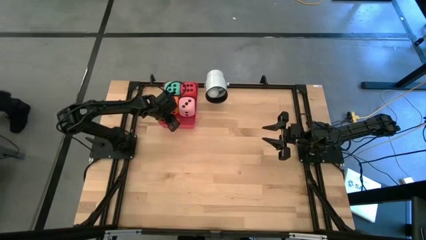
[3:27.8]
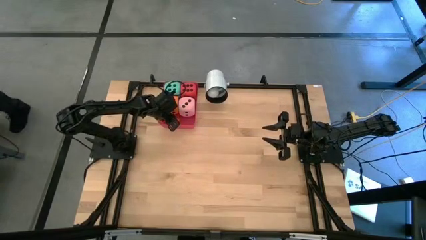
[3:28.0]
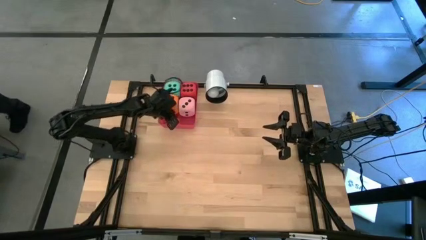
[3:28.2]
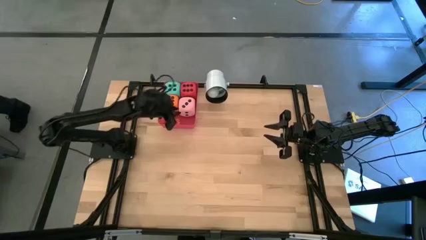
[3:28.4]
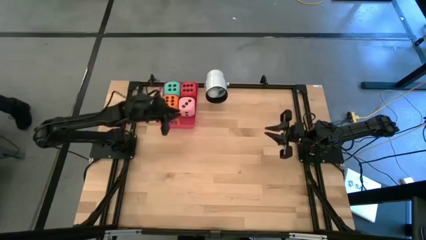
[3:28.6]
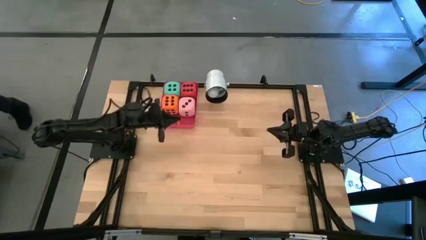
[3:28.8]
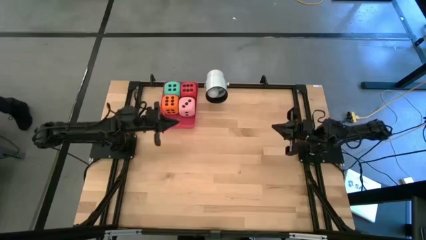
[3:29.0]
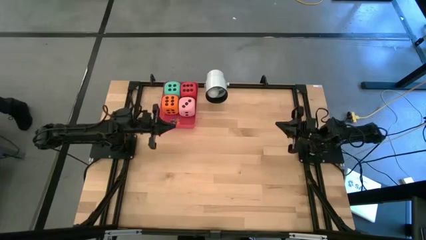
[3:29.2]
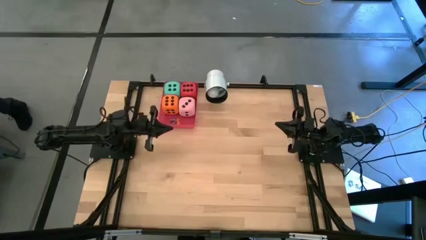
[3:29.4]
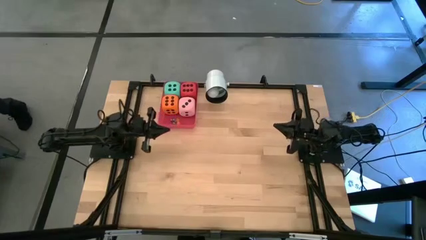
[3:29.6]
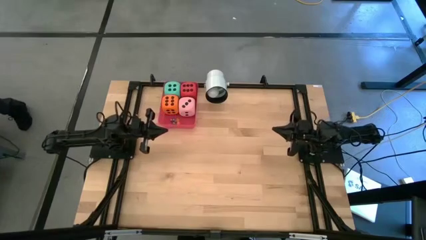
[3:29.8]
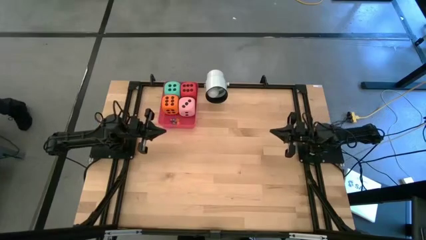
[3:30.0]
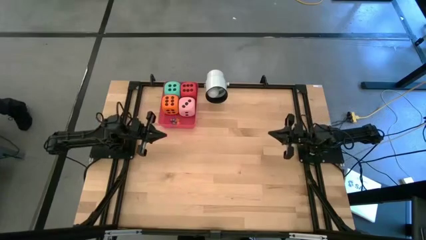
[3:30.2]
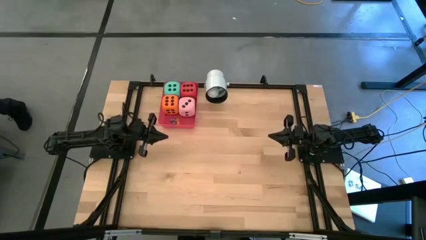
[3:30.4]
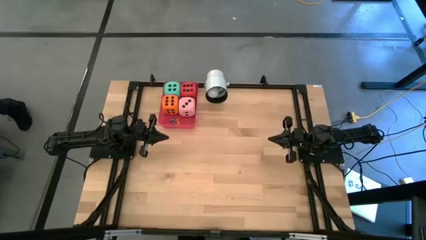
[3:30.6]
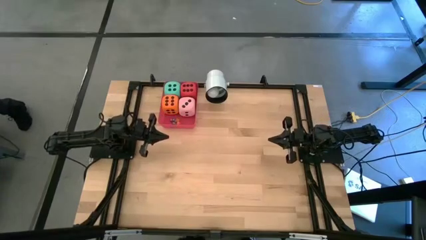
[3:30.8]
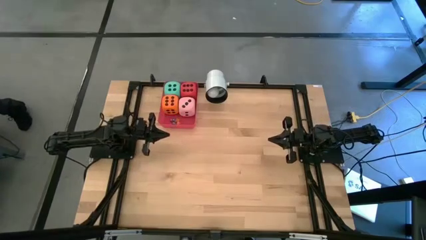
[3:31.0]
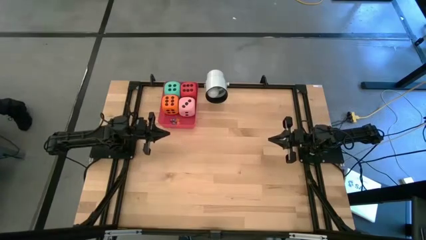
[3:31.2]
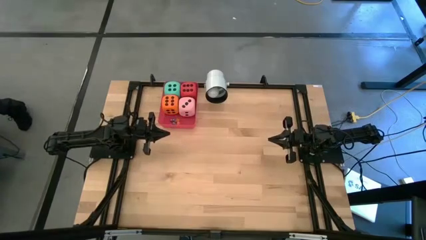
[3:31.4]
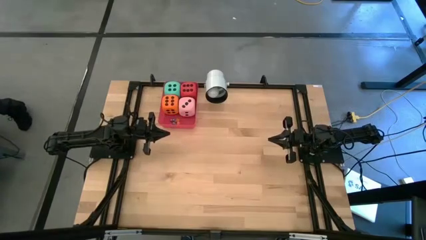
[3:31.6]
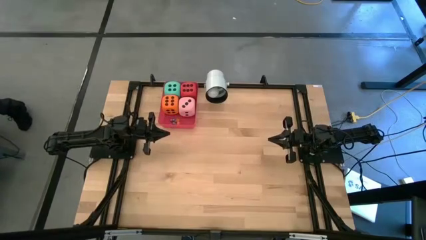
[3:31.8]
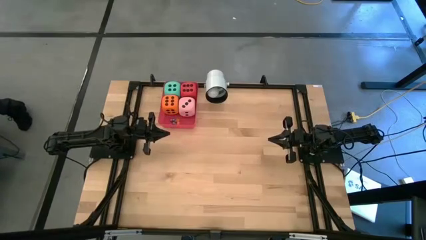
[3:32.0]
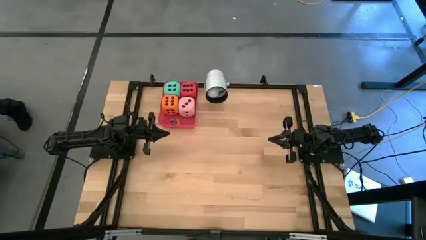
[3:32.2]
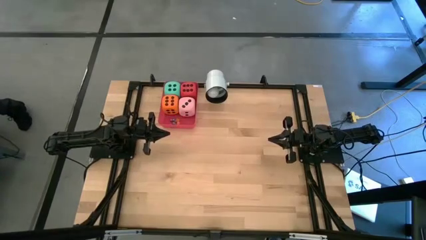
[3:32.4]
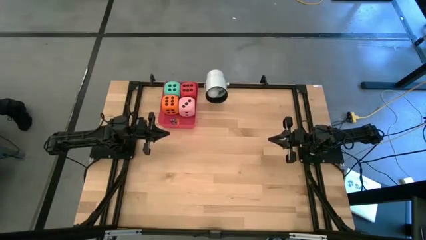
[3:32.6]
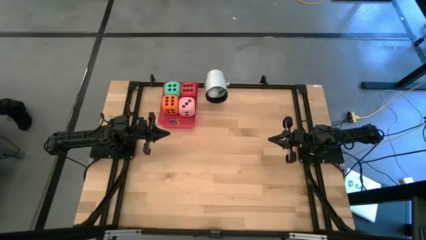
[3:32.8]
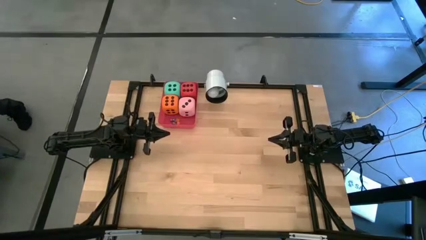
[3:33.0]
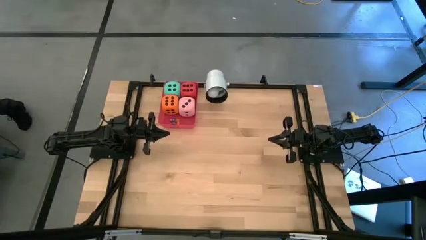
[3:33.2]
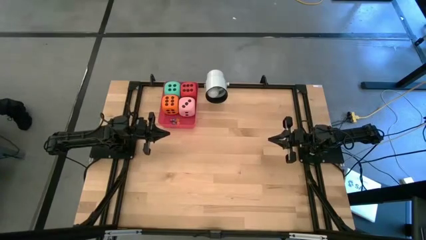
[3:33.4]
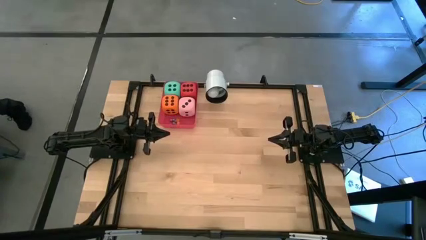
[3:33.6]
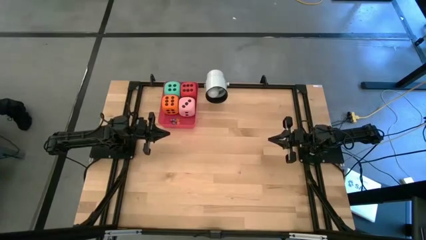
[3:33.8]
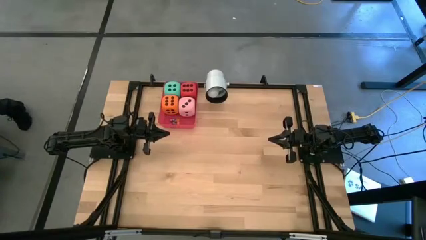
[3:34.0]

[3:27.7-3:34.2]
Task: Pick & Place Dice
Return to Home Position

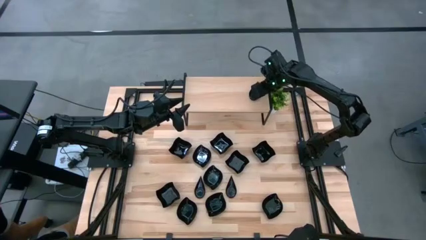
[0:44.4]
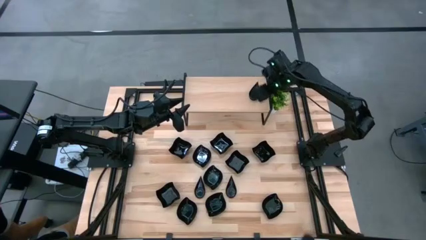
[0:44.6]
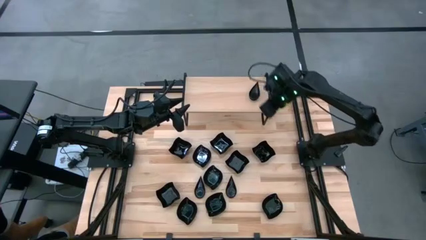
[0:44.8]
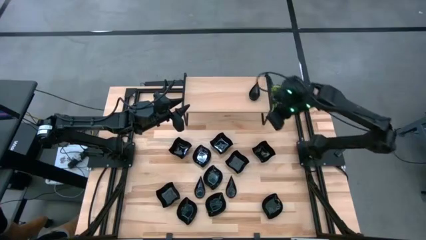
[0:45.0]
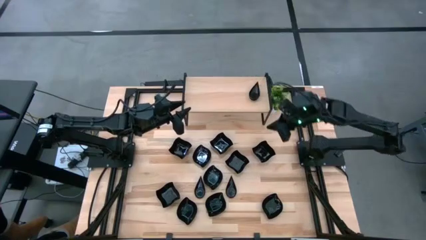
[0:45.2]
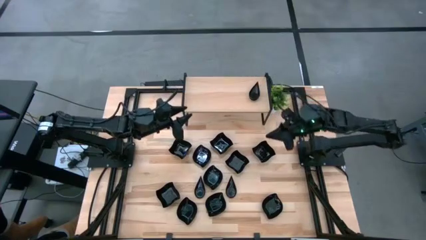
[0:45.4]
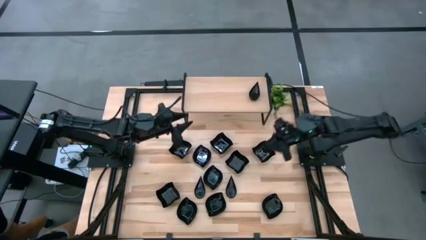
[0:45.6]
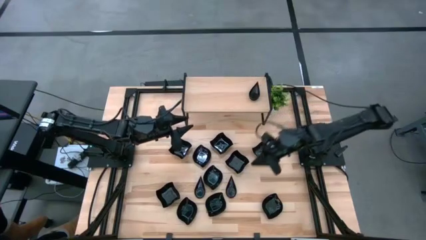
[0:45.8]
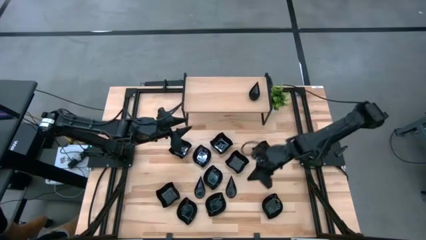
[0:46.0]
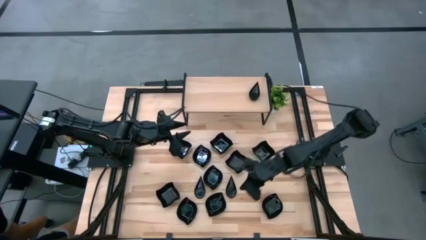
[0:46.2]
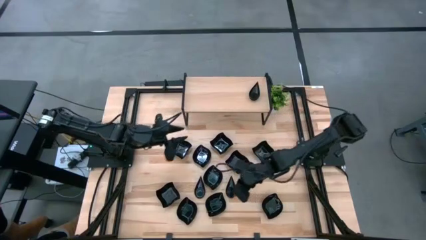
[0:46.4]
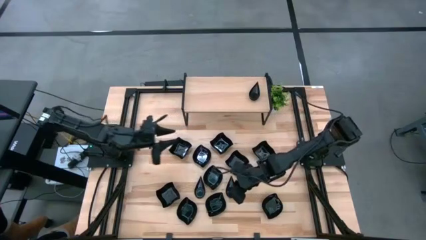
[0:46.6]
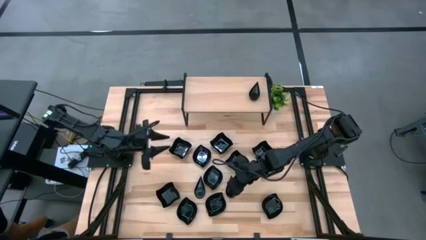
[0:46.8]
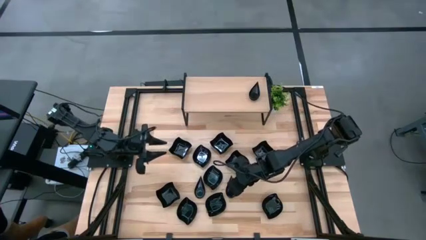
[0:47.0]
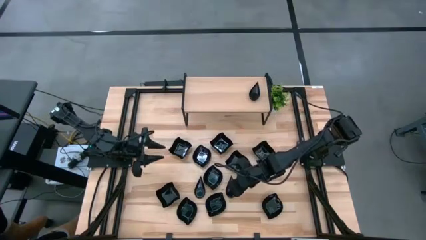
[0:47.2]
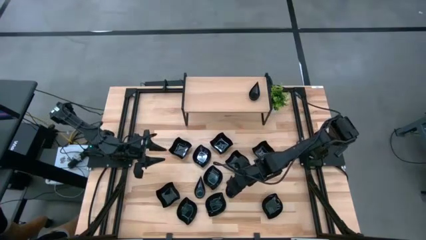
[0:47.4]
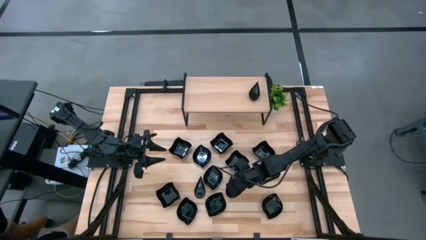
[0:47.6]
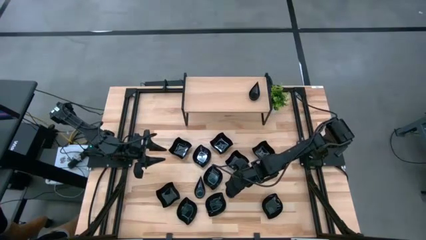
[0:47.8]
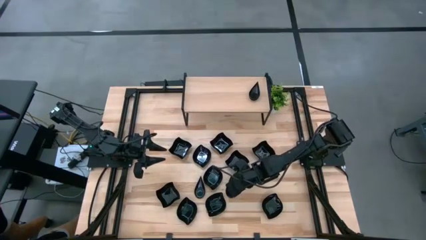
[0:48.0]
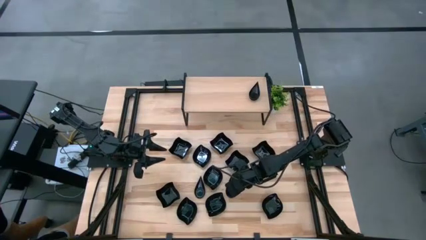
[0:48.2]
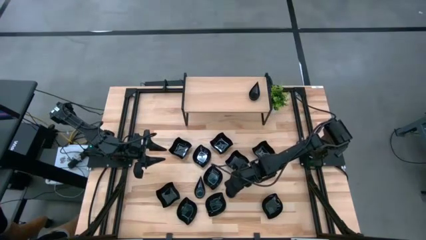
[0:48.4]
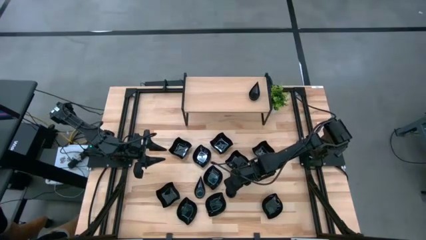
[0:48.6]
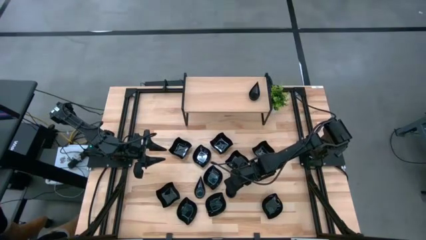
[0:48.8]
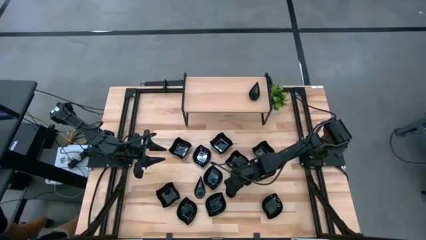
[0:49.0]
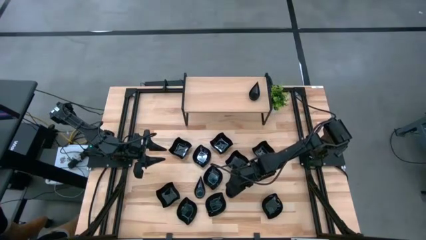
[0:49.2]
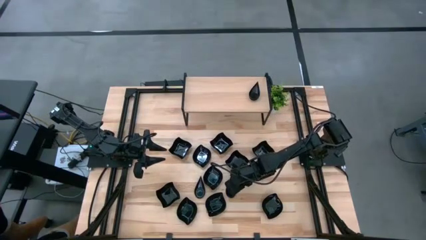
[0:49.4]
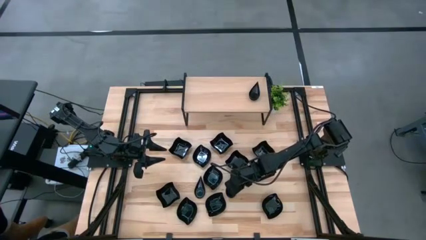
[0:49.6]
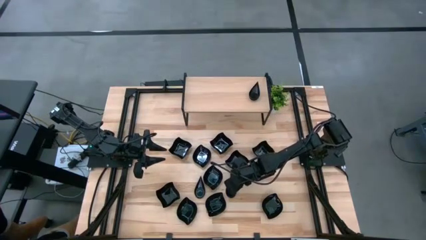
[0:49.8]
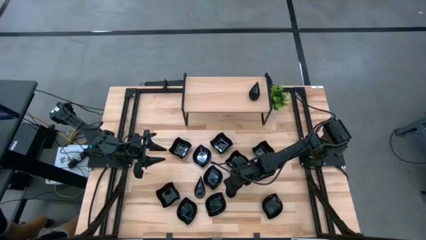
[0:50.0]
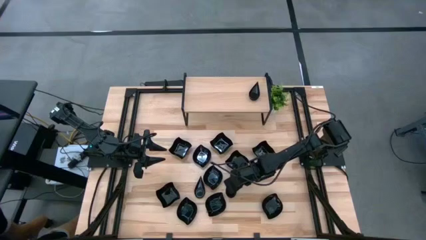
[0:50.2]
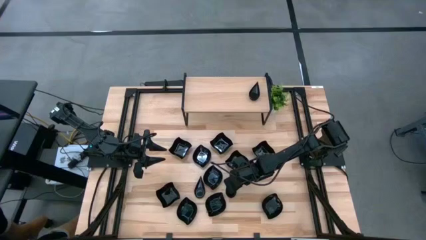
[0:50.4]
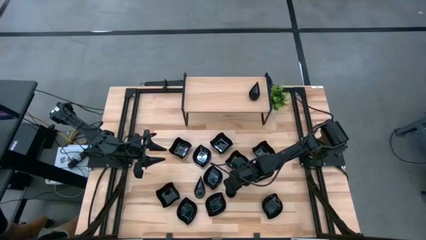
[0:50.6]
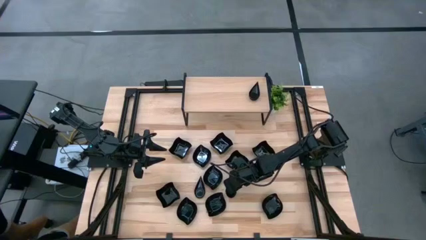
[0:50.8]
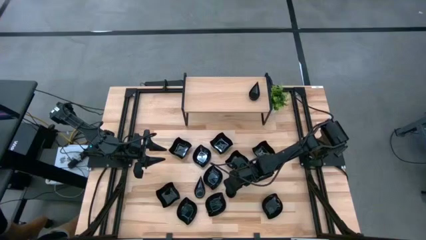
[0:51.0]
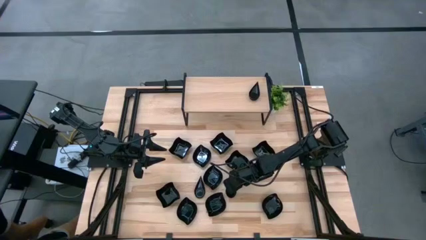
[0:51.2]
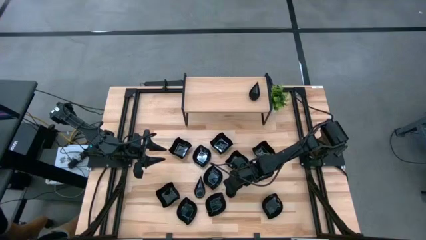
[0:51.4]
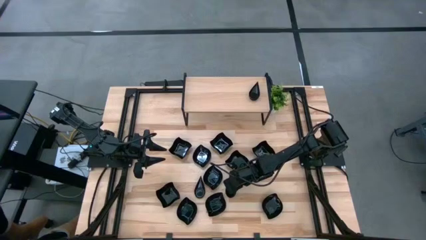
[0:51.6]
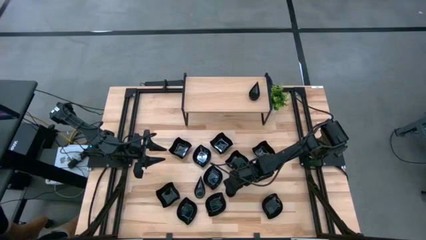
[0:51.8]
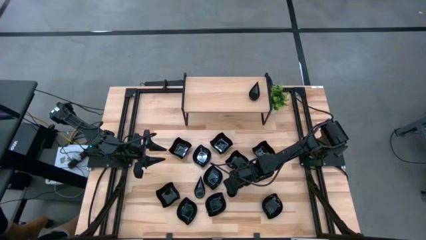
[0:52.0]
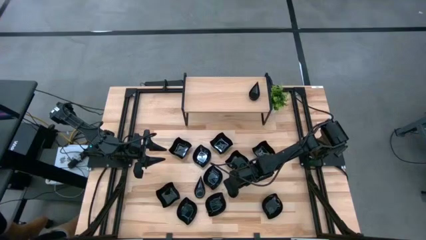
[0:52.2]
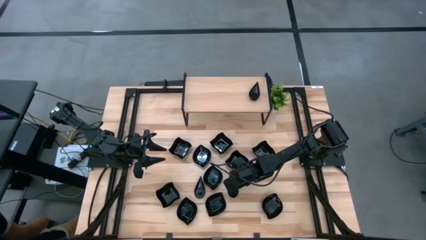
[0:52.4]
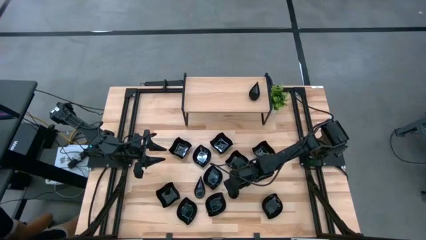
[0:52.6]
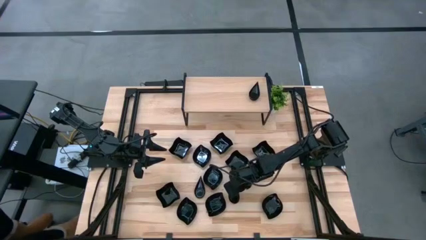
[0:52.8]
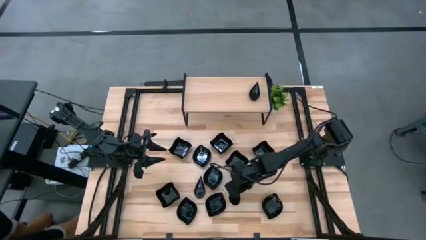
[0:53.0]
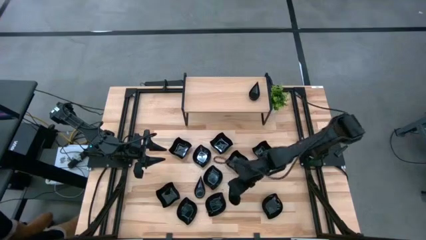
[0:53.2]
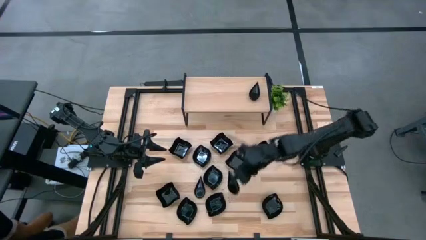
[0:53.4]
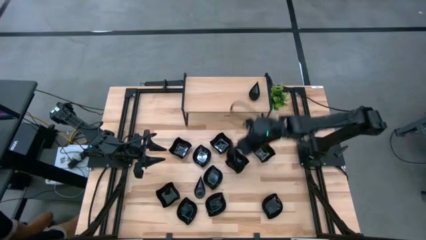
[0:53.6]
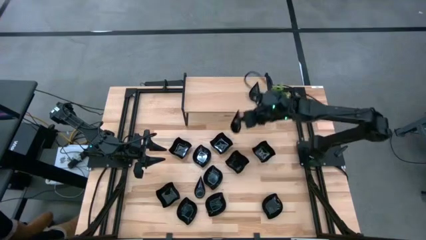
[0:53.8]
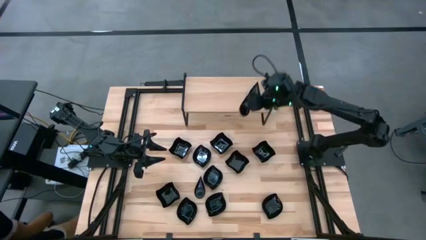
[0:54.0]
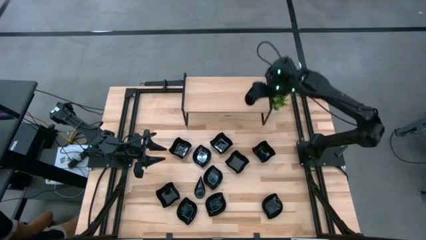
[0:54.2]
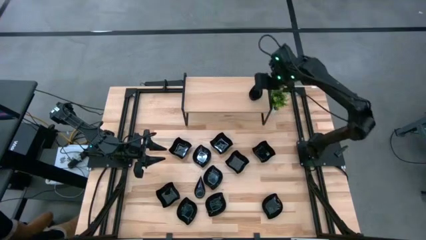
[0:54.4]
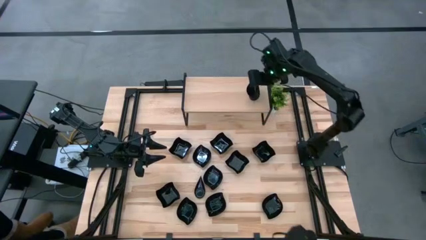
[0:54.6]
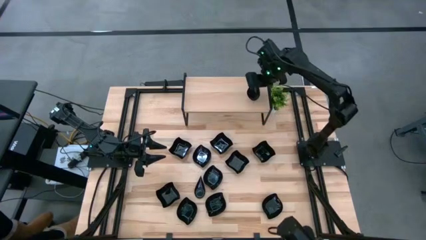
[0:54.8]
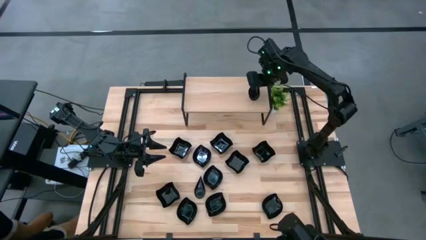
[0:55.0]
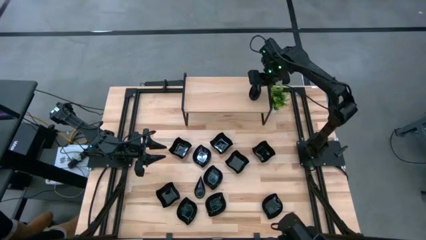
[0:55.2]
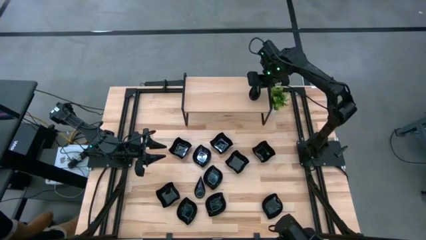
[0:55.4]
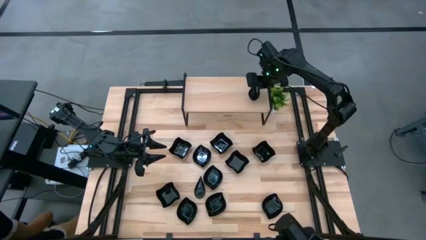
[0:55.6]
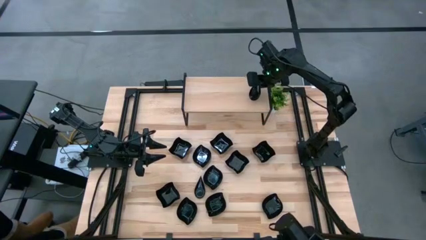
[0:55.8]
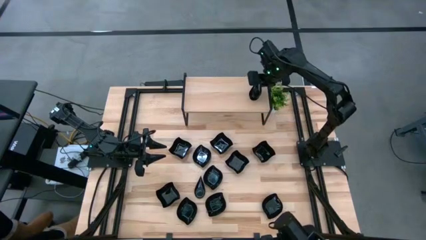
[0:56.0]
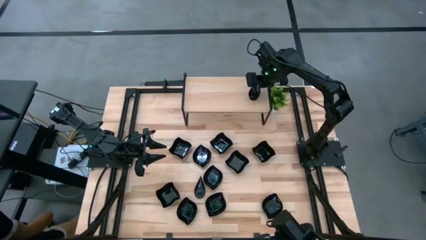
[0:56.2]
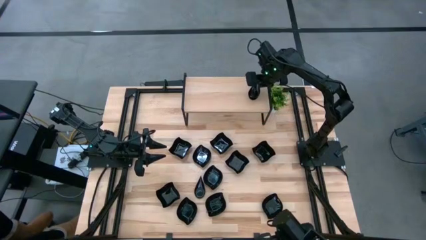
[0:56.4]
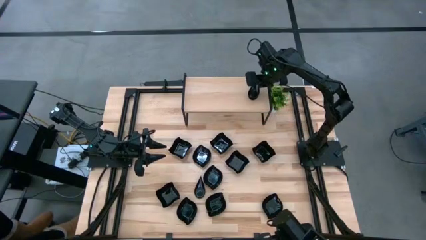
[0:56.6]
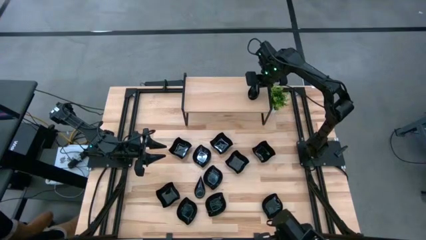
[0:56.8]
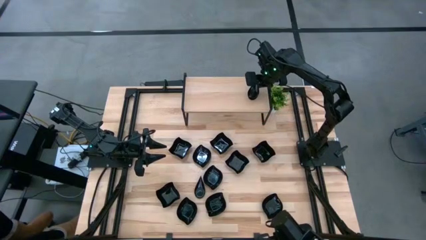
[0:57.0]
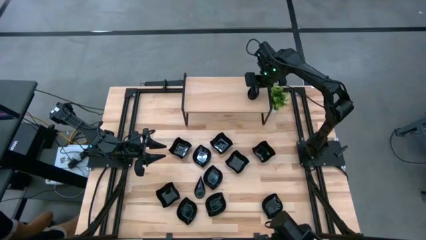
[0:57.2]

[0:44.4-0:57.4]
Task: Pick & Place Mini shaped plates
Stack the right black drop shaped plate on top of the other black drop shaped plates on the shelf
